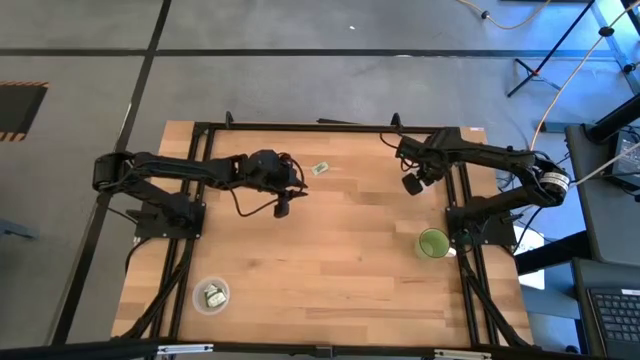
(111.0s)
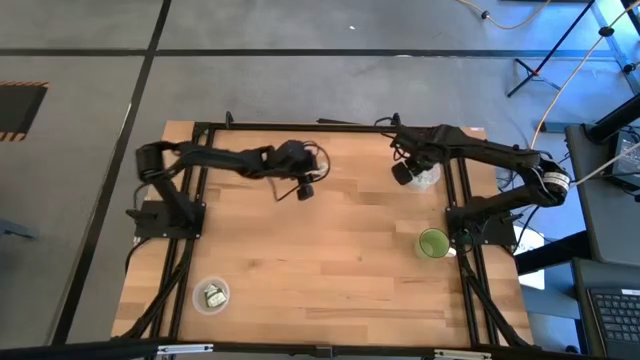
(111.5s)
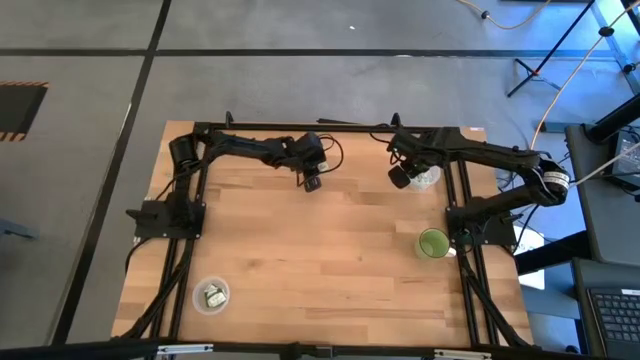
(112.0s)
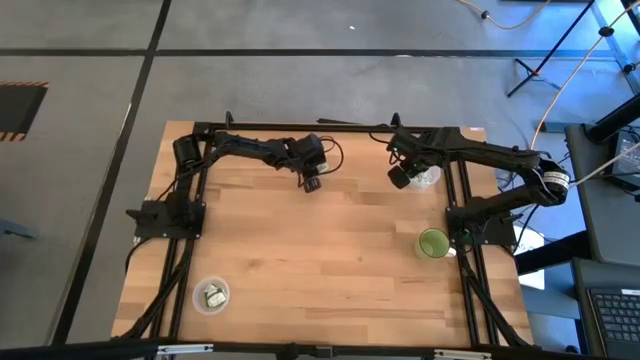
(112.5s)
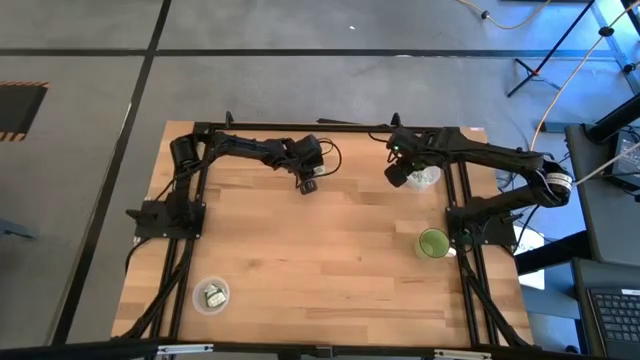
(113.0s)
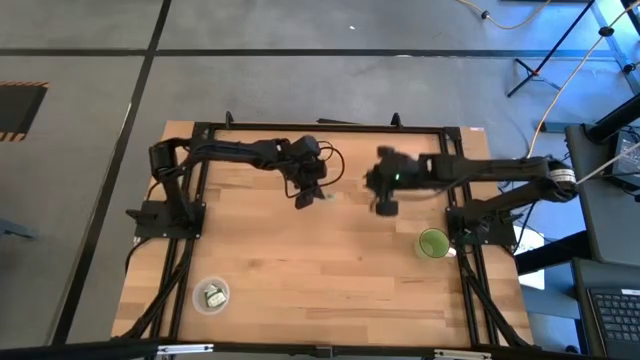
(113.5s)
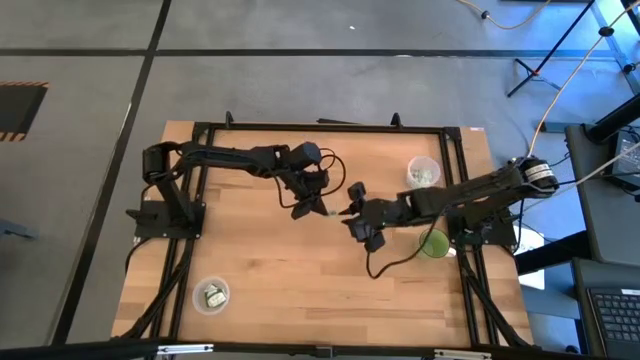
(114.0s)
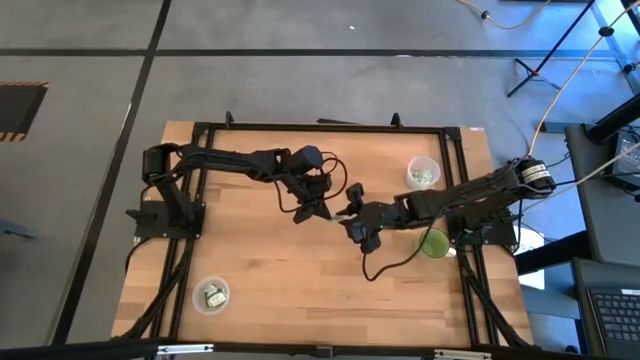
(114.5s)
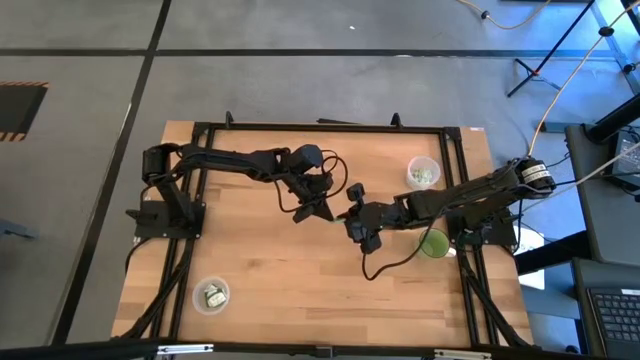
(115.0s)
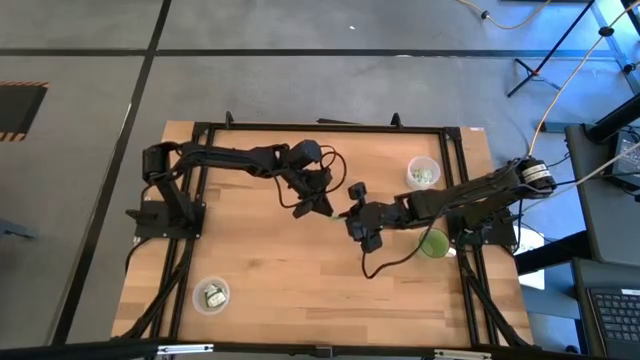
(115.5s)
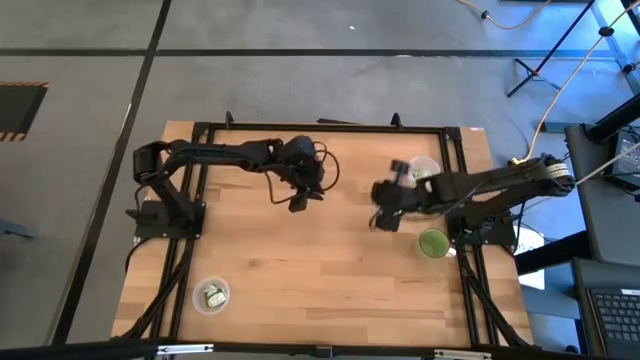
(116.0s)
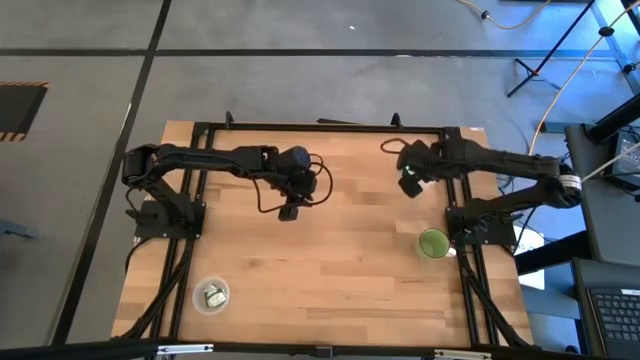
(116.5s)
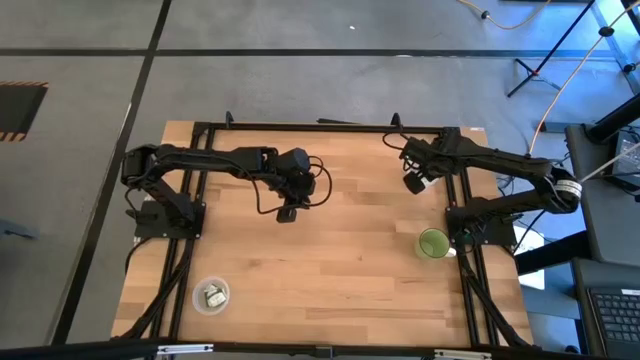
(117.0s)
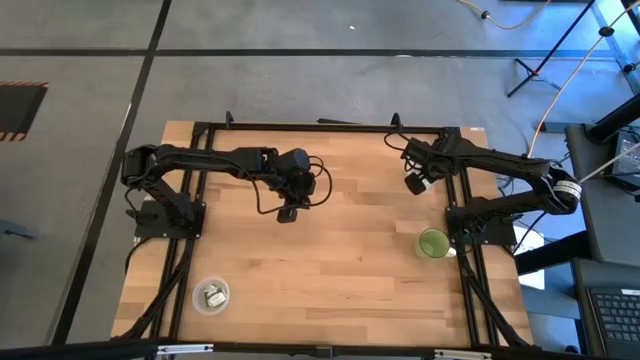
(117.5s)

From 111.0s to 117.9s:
Task: Pick and place items into bin
Put the white stevia packet into the top white bin

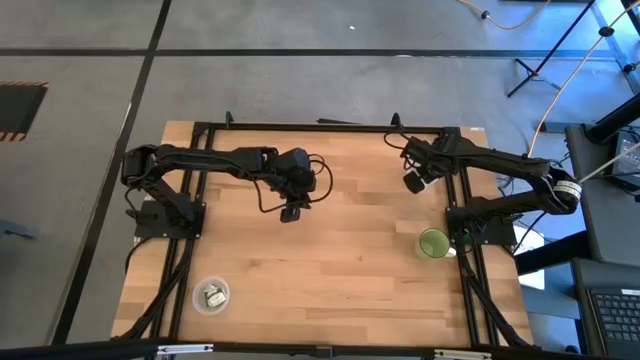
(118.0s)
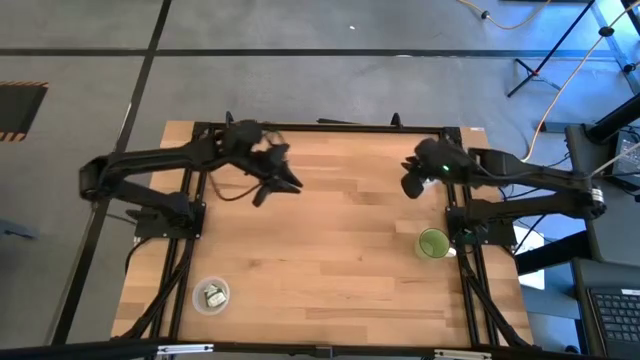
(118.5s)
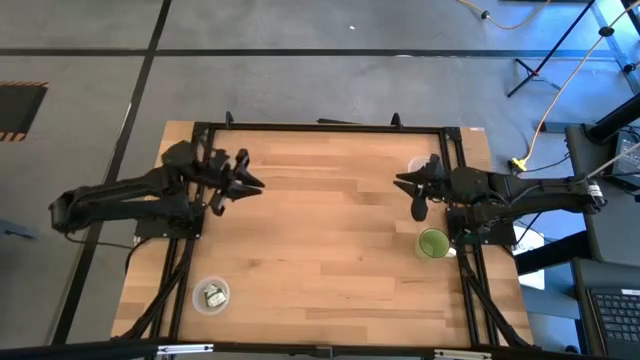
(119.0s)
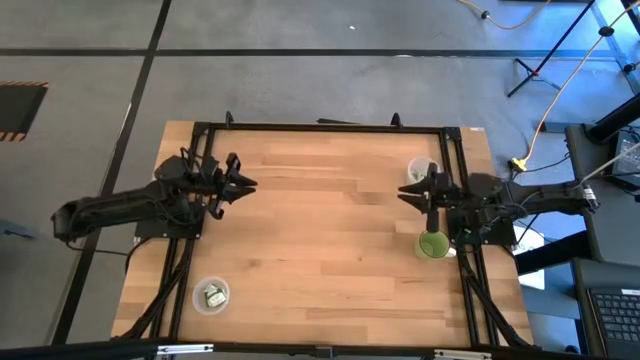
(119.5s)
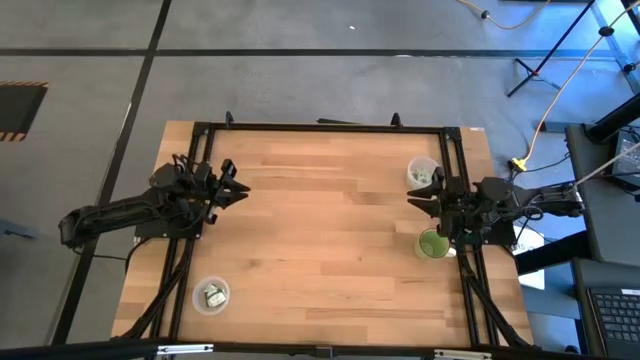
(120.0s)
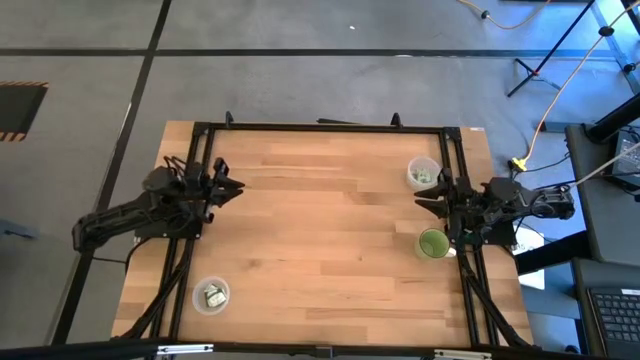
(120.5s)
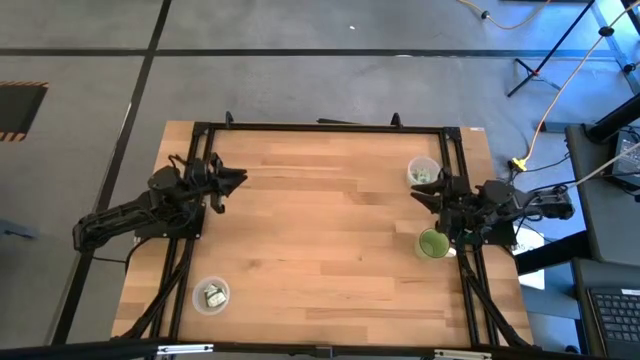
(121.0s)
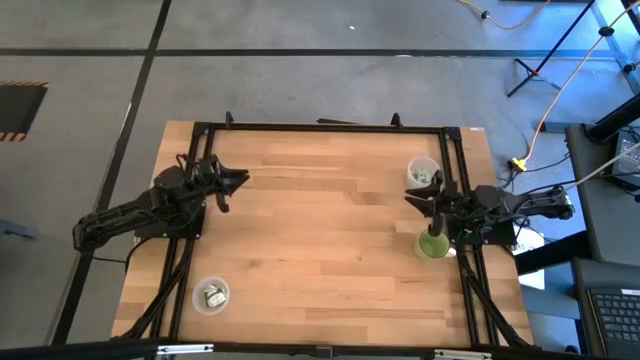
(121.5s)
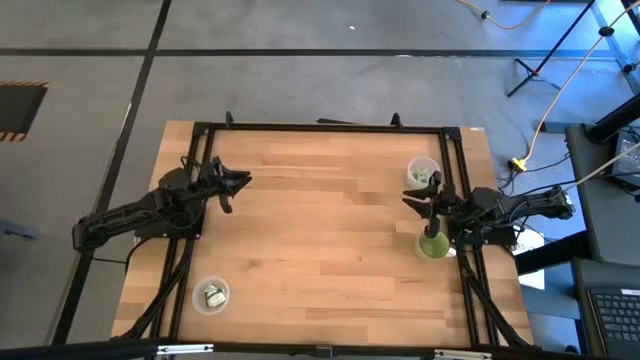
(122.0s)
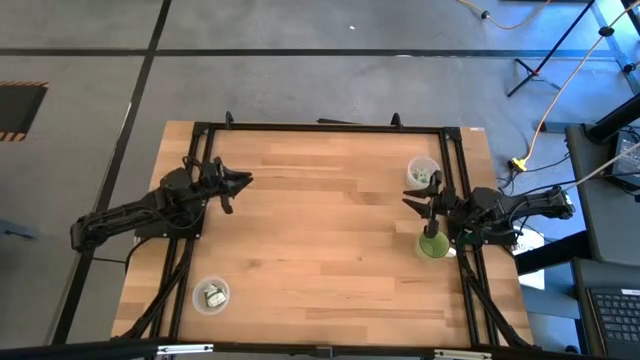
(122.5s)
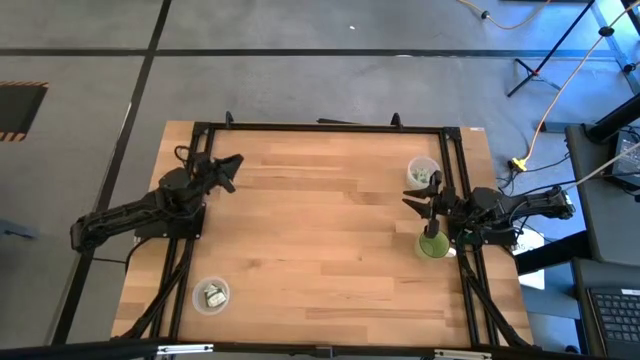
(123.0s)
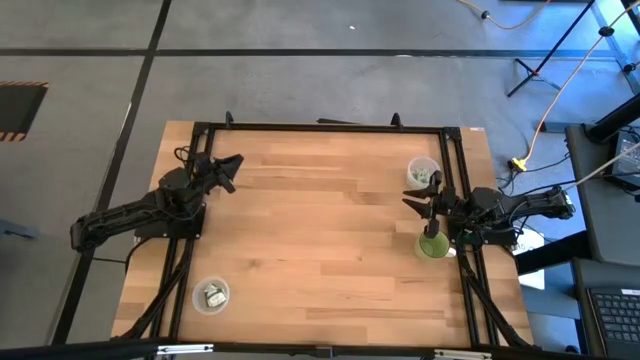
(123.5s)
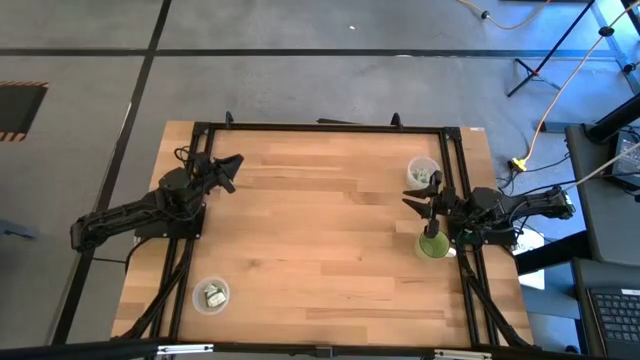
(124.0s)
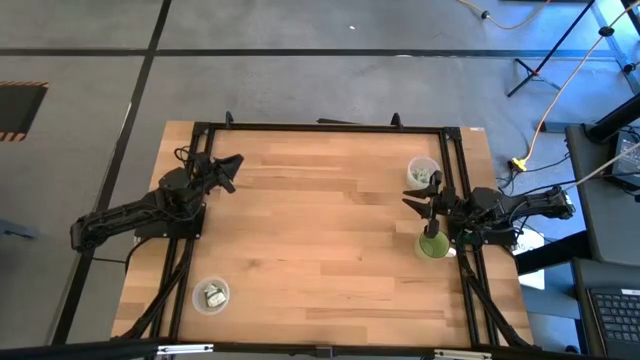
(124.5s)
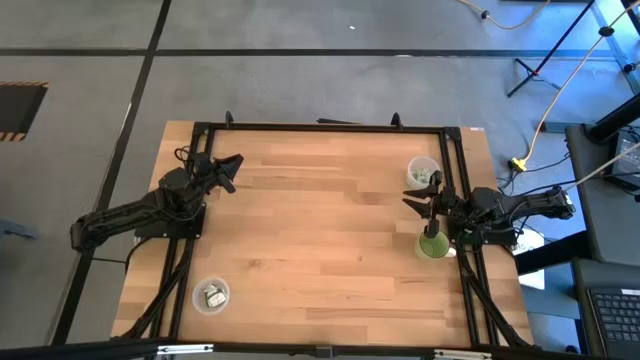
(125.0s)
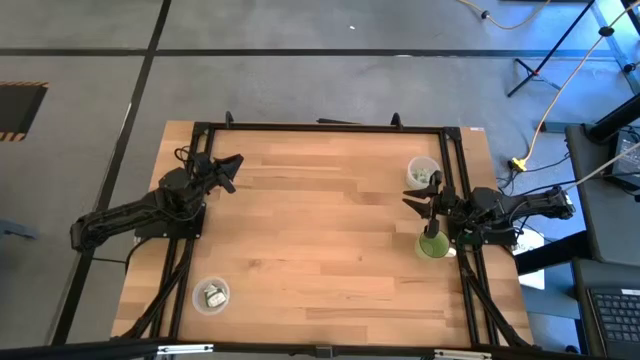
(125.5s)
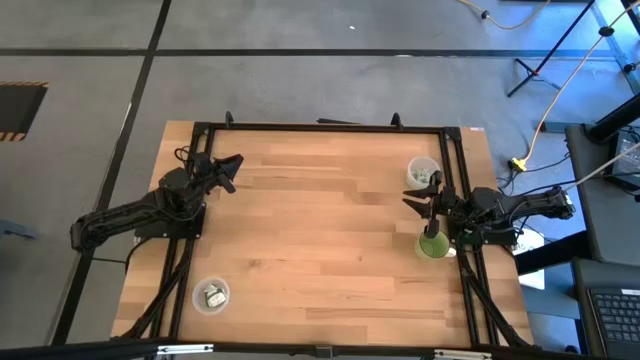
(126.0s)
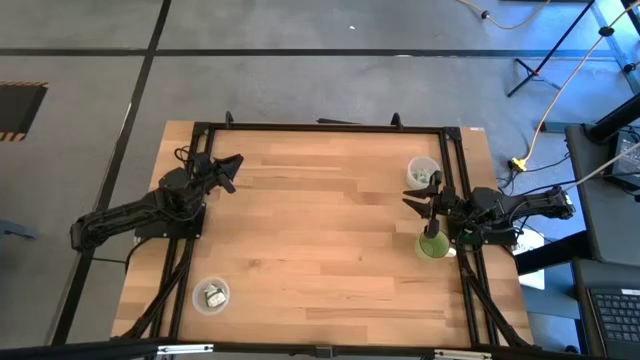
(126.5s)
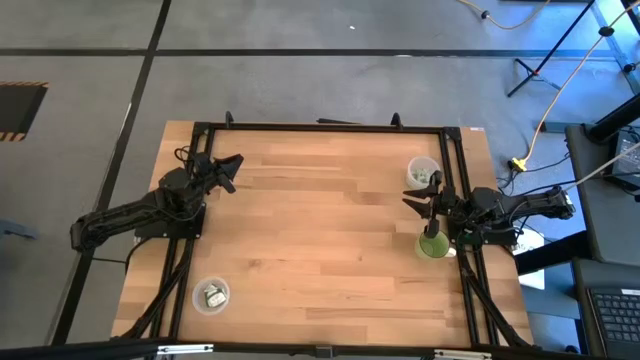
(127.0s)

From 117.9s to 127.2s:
Return to Home Position

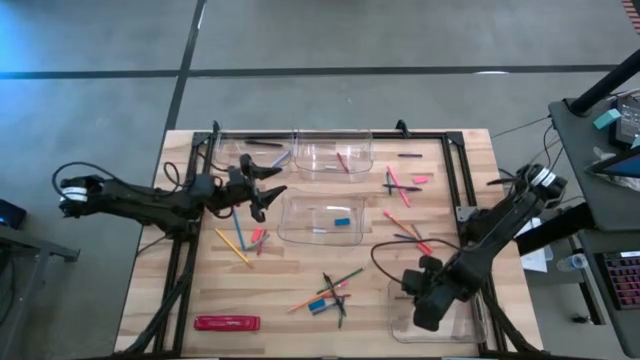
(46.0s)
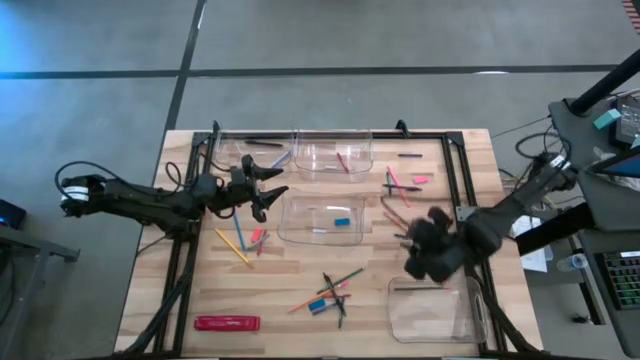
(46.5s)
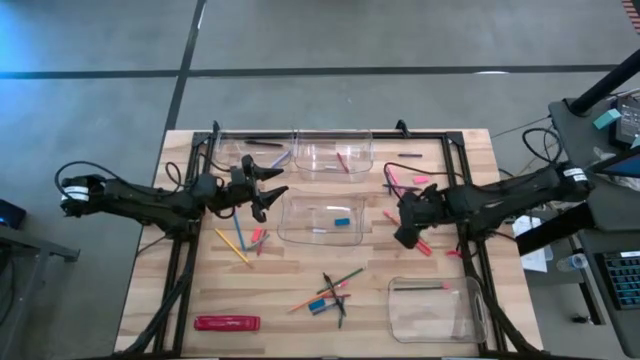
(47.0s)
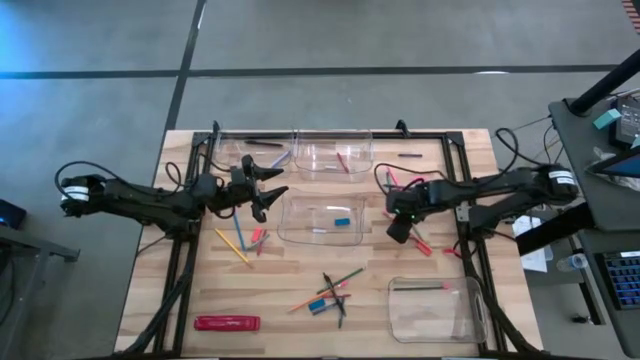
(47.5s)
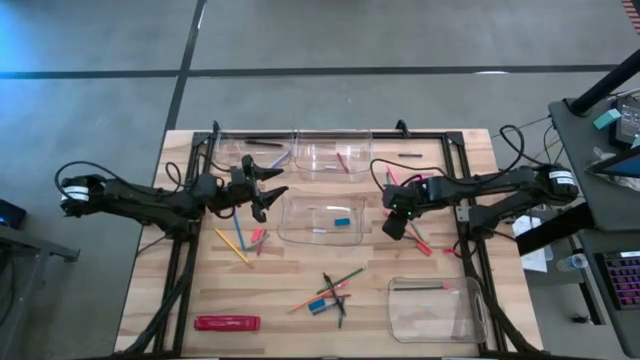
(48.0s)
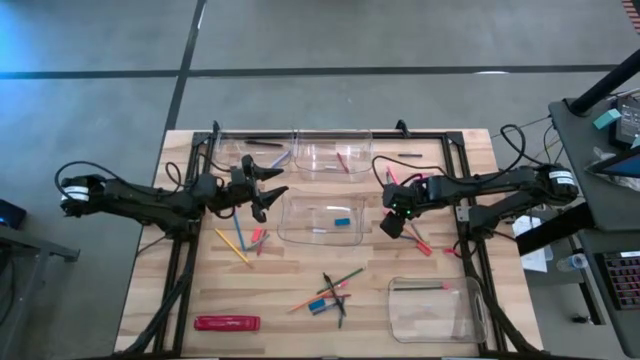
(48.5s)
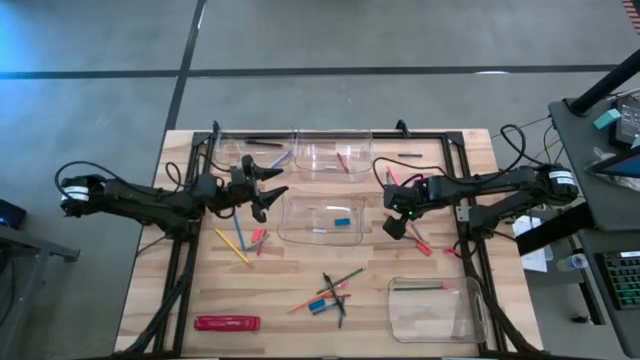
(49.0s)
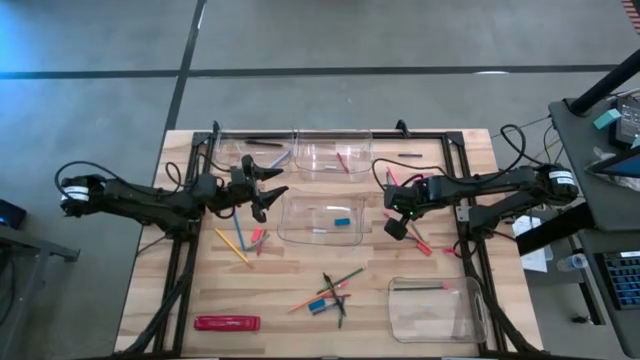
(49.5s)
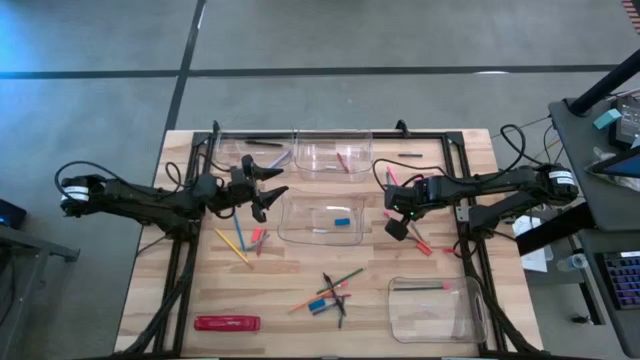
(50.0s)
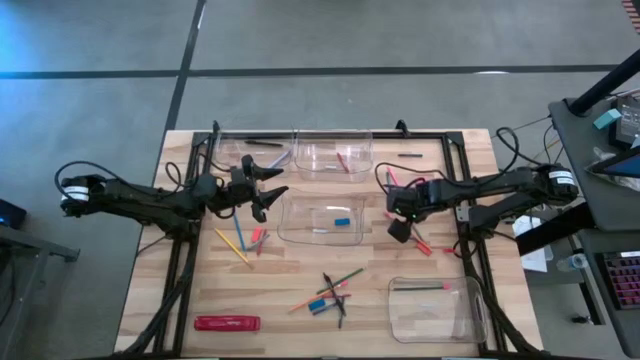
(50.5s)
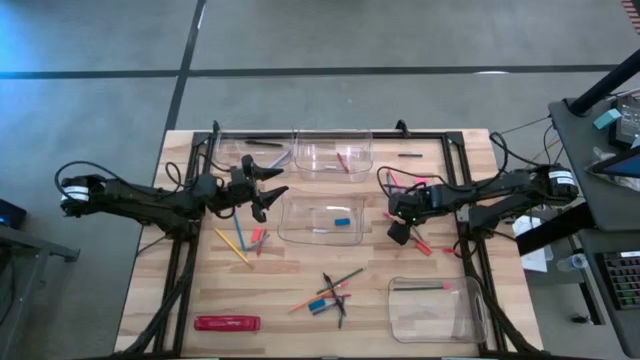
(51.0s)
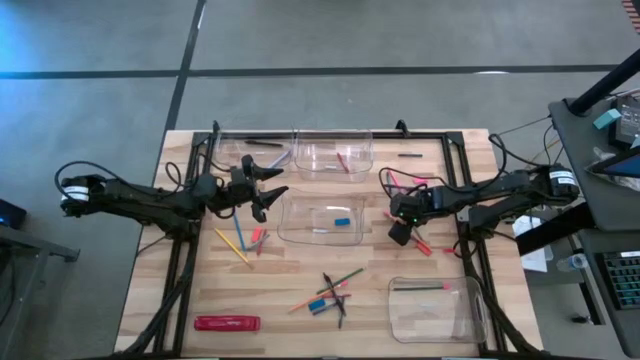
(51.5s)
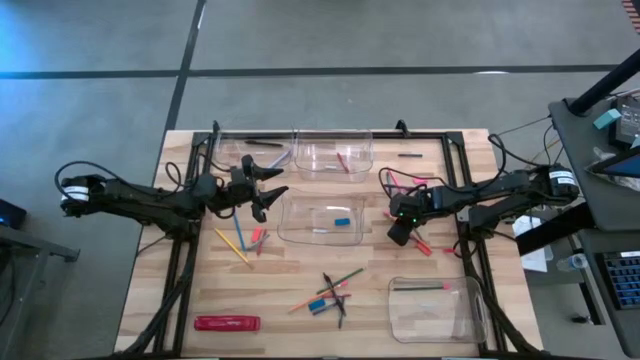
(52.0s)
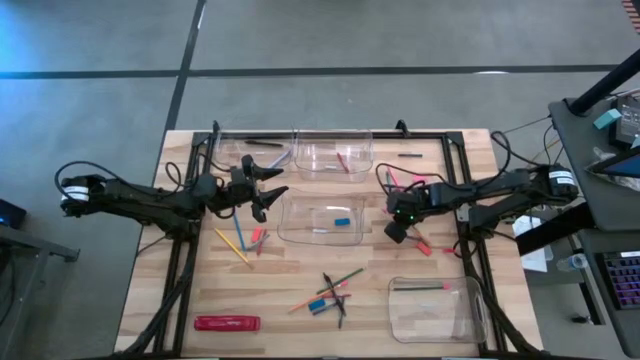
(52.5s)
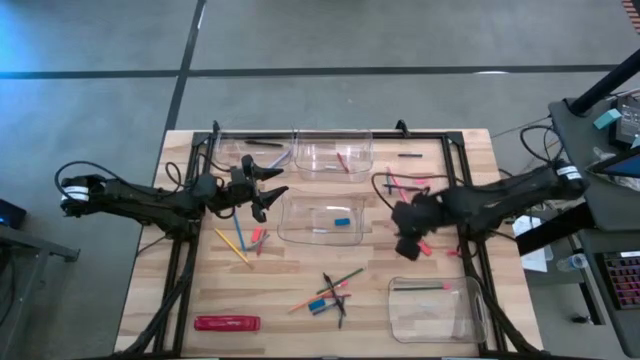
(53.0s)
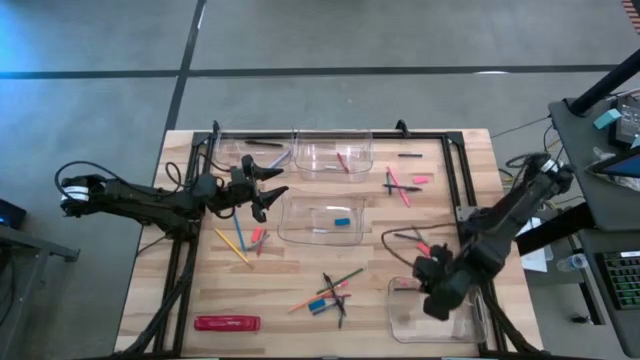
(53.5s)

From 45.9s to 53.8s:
Task: Sort crayons/erasers/pens/pencils in bins
Put the yellow pencil into the bottom transparent bin
